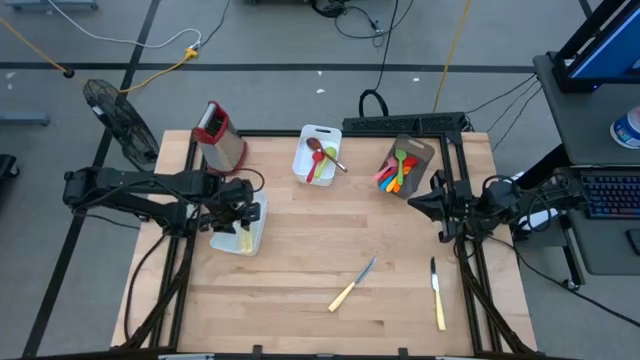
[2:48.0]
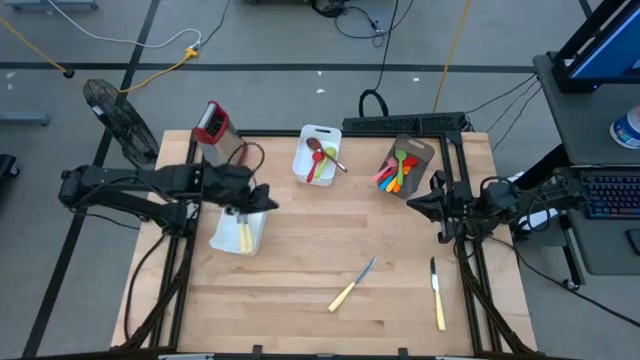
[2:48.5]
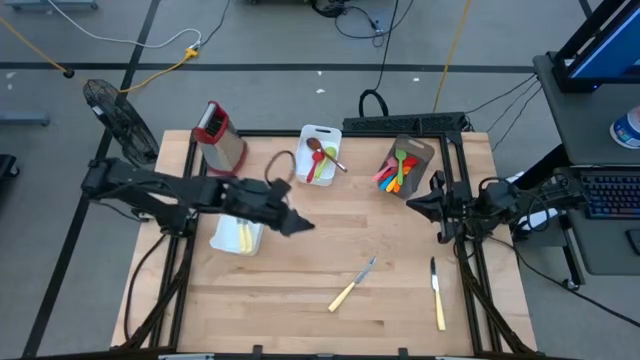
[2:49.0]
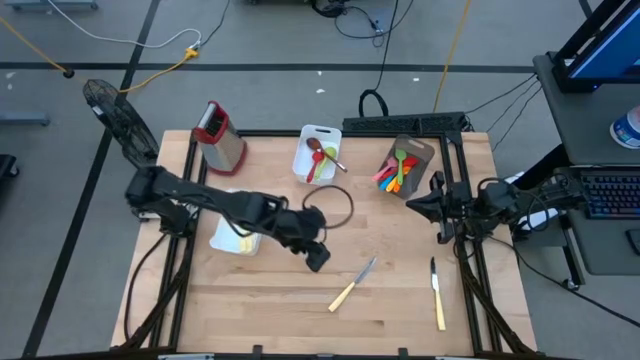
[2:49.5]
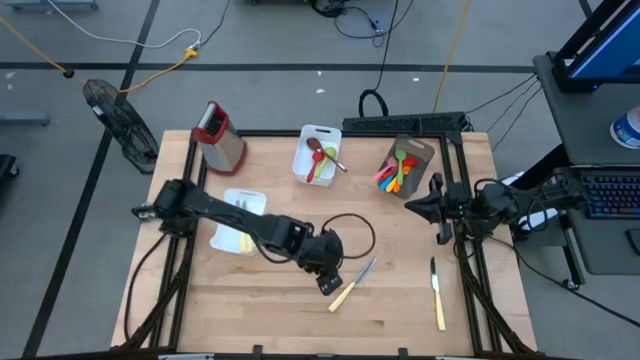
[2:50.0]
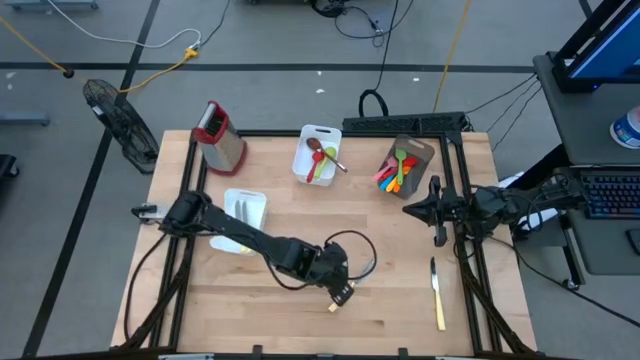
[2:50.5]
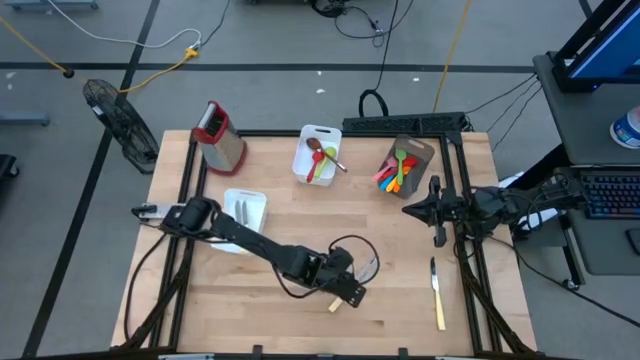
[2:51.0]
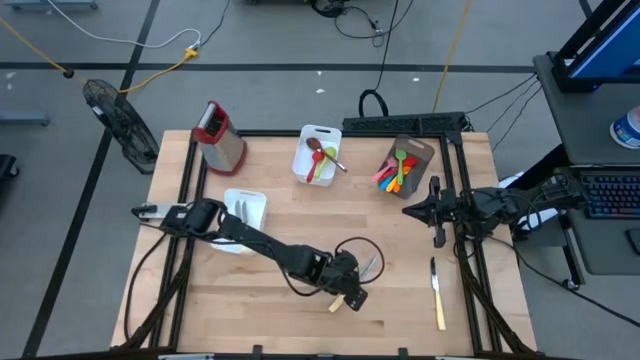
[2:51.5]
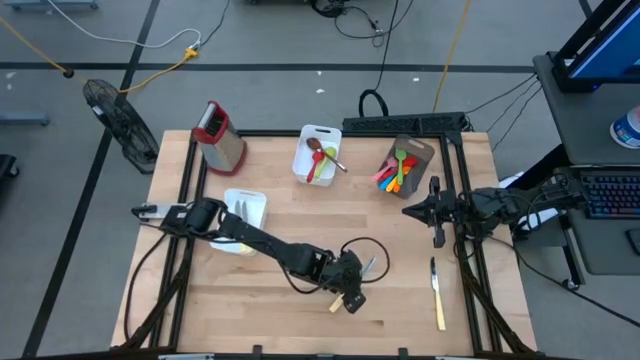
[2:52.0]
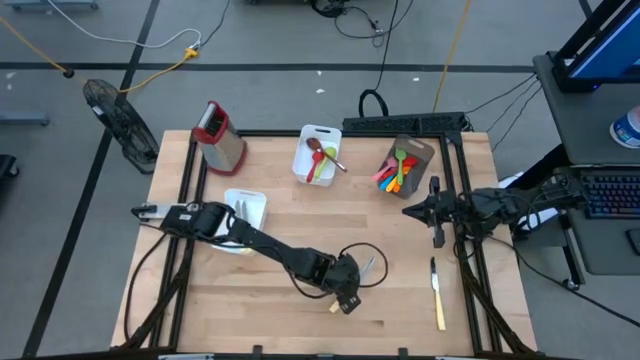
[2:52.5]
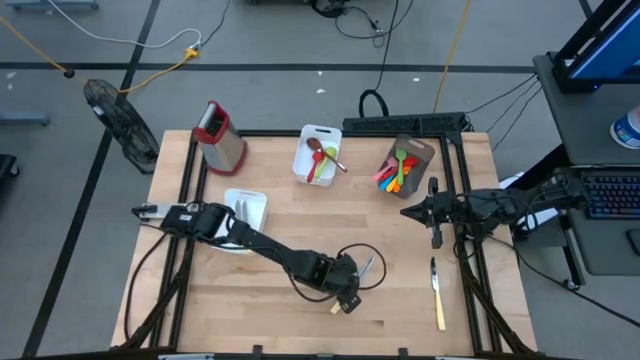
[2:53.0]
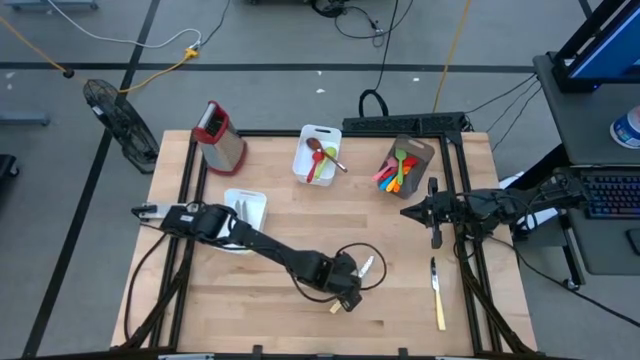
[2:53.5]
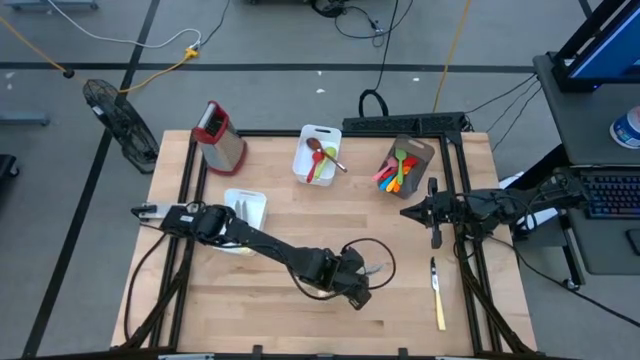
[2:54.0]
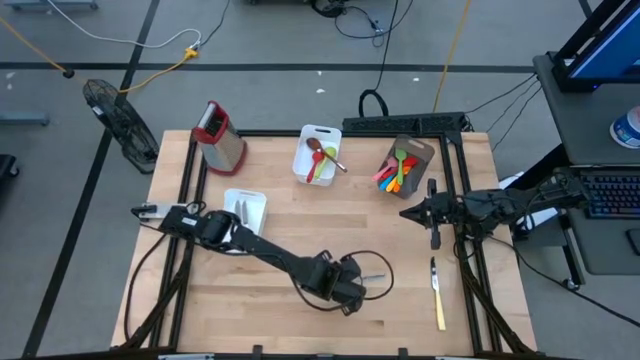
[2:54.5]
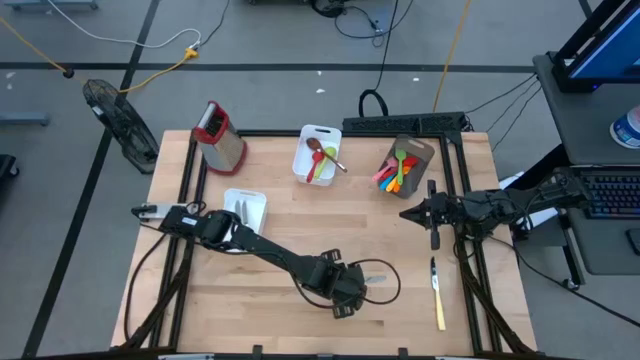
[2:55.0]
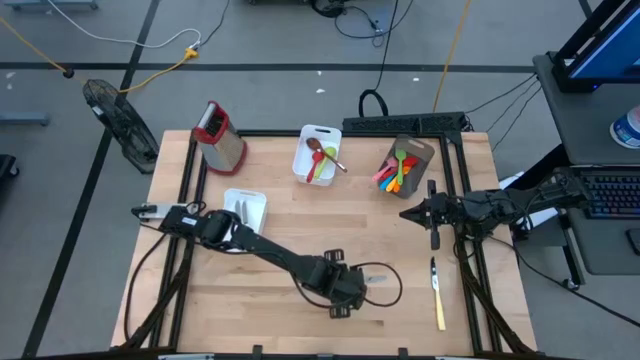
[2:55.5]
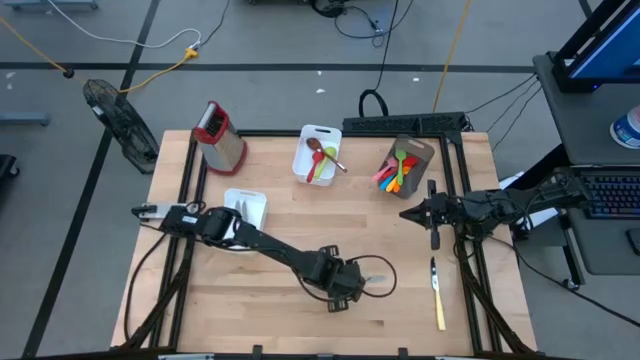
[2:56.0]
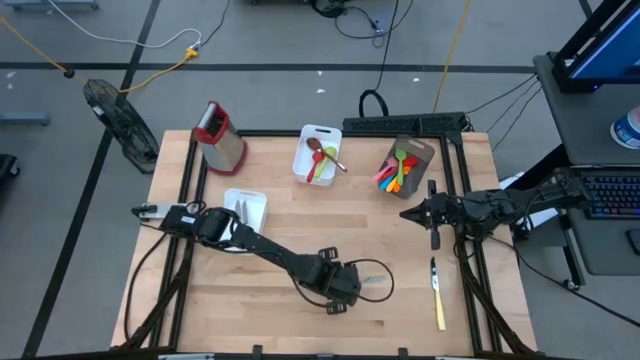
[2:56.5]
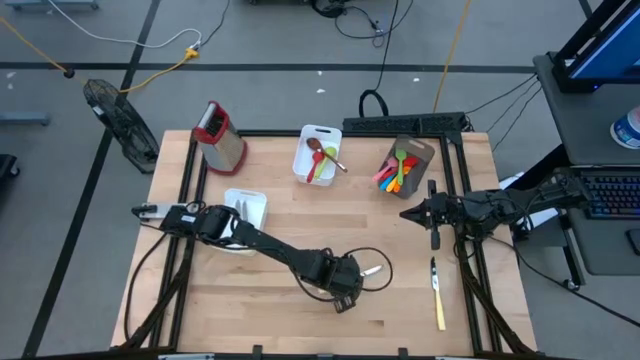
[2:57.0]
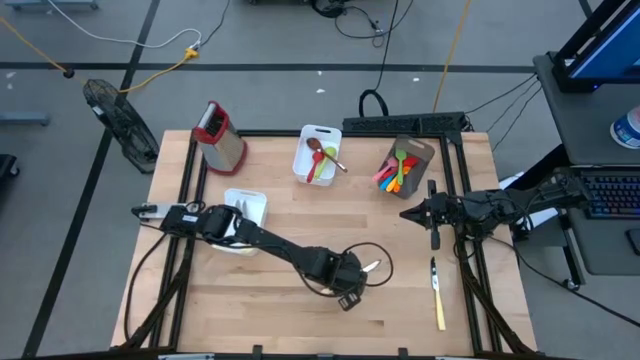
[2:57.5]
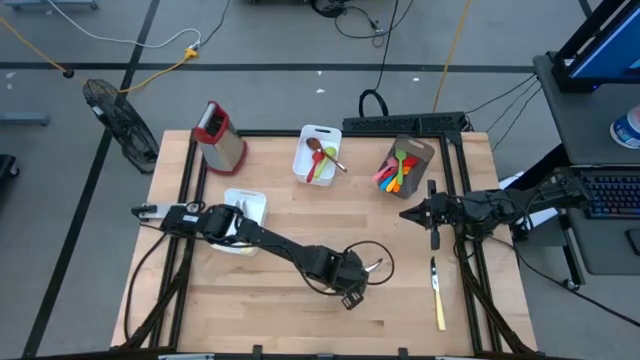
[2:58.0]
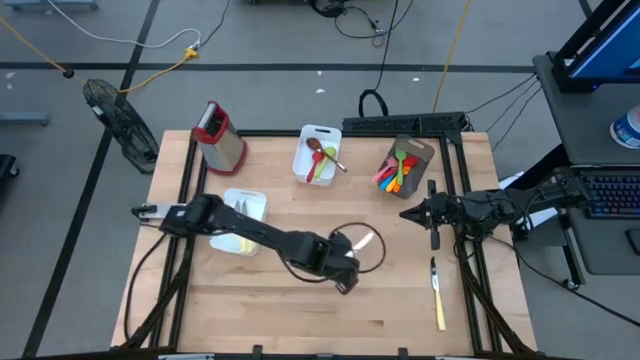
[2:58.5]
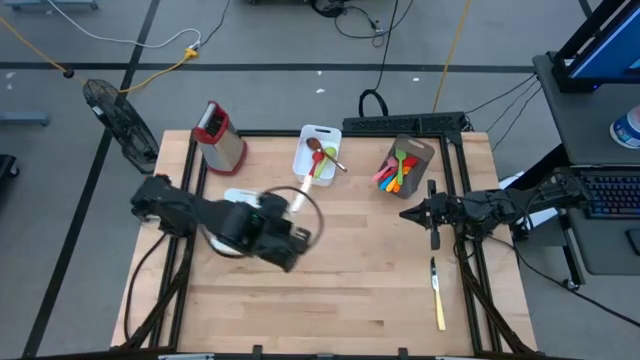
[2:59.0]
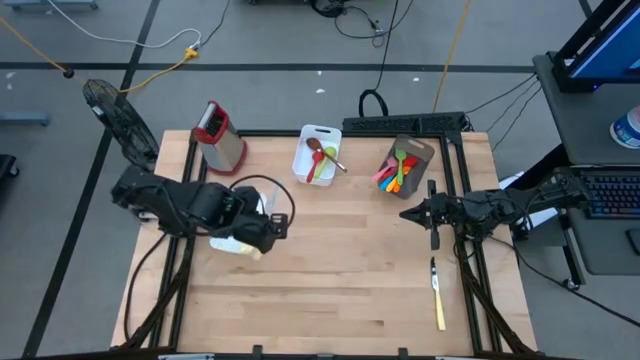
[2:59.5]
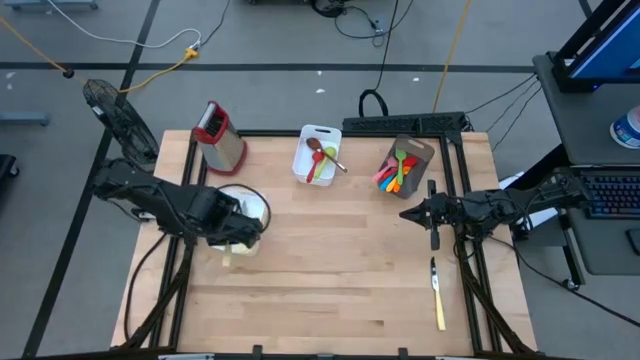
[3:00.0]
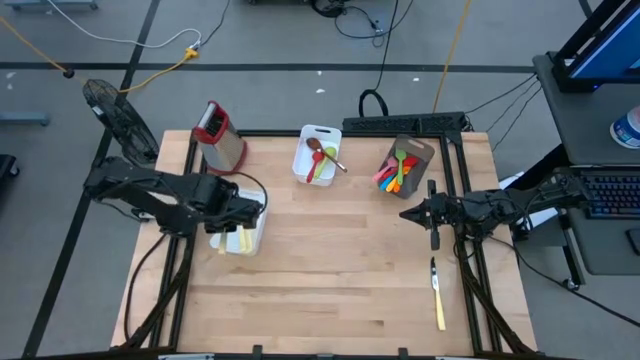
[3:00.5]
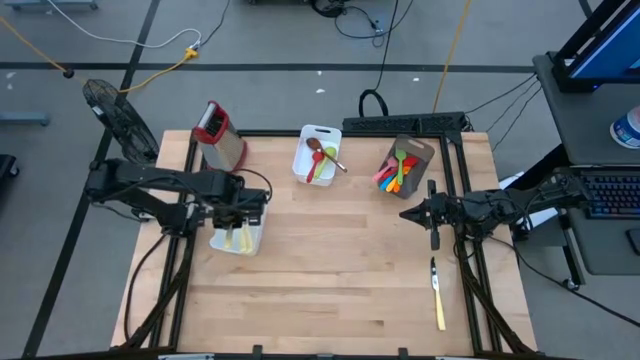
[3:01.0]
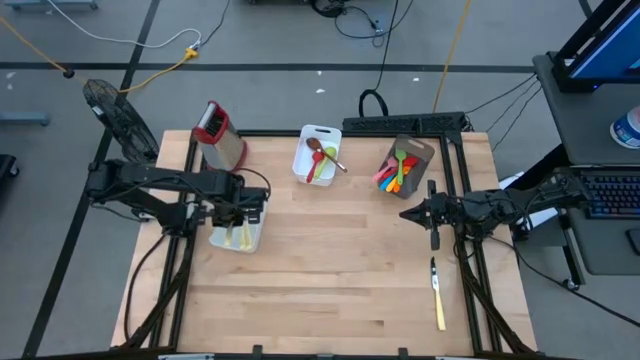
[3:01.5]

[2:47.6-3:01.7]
Task: Pick & Place Kitchen Items
Put the yellow knife into the bottom white bin

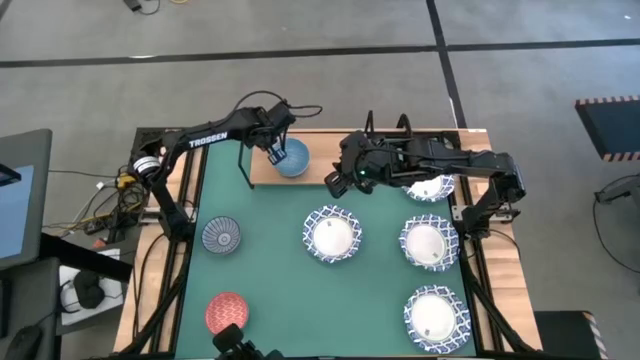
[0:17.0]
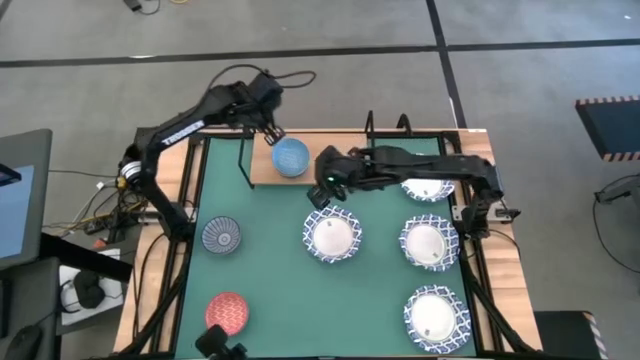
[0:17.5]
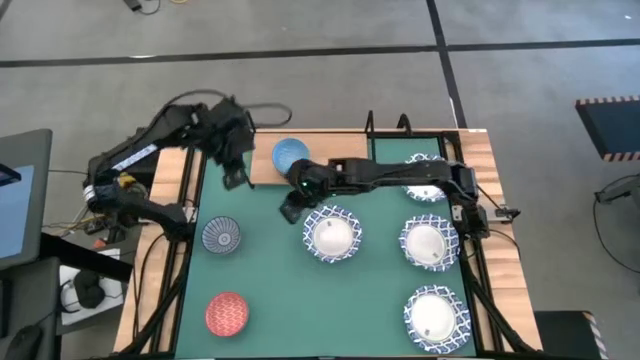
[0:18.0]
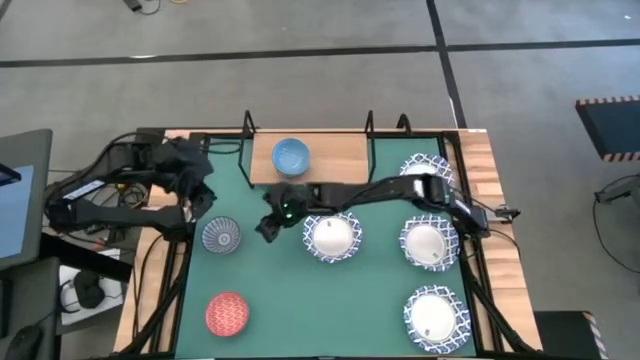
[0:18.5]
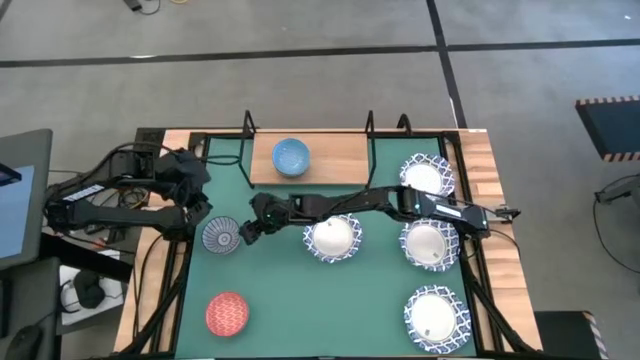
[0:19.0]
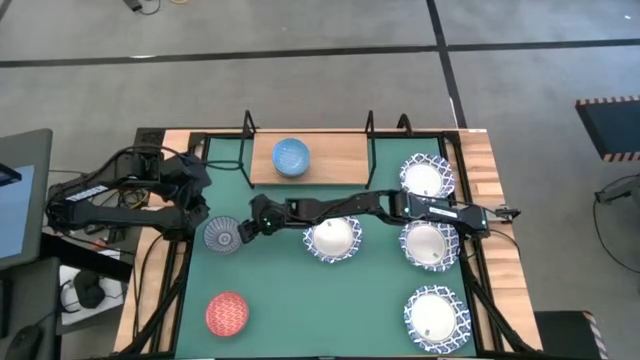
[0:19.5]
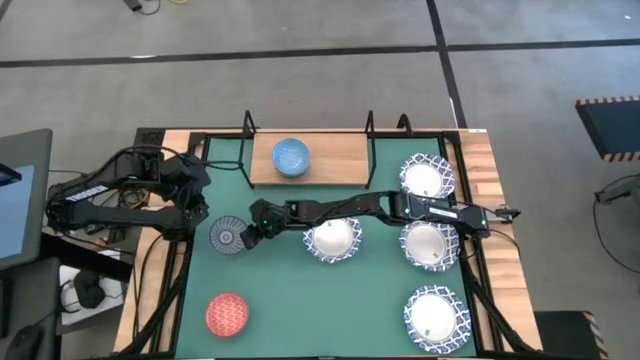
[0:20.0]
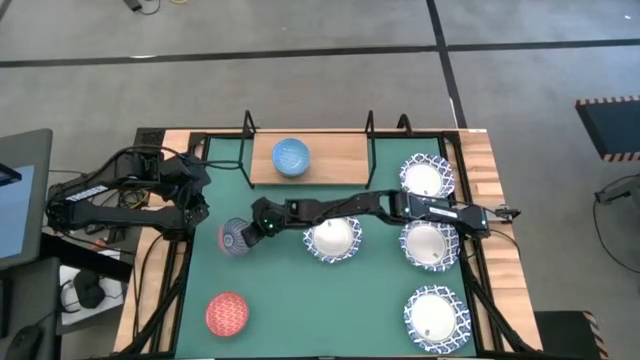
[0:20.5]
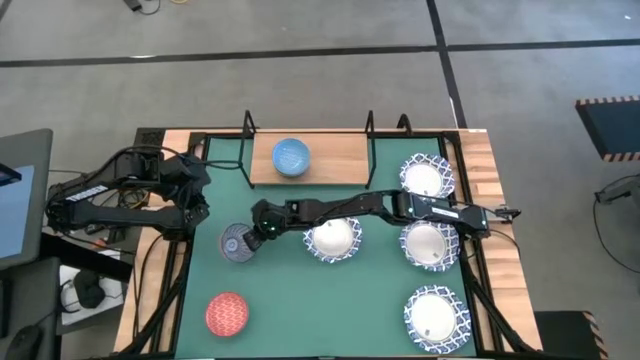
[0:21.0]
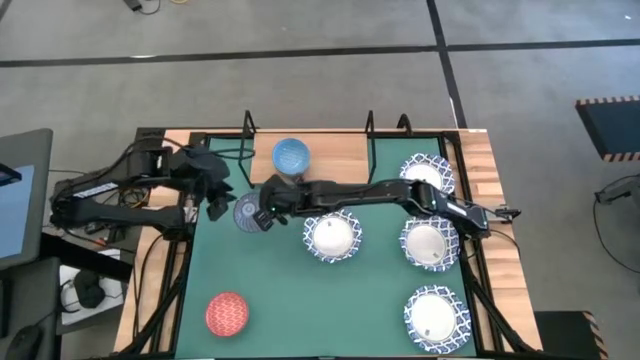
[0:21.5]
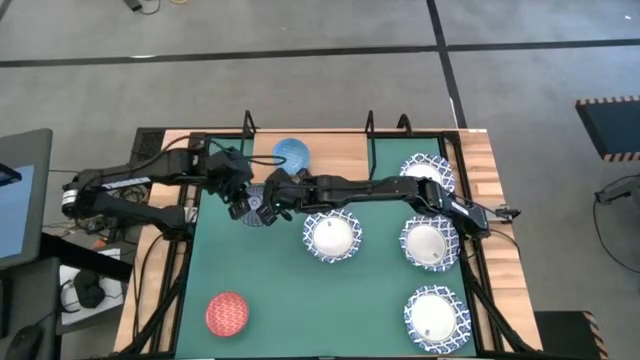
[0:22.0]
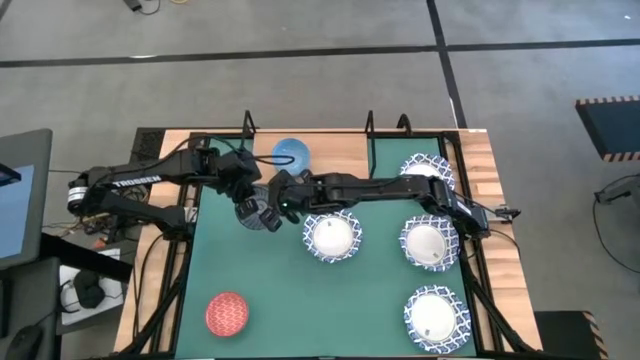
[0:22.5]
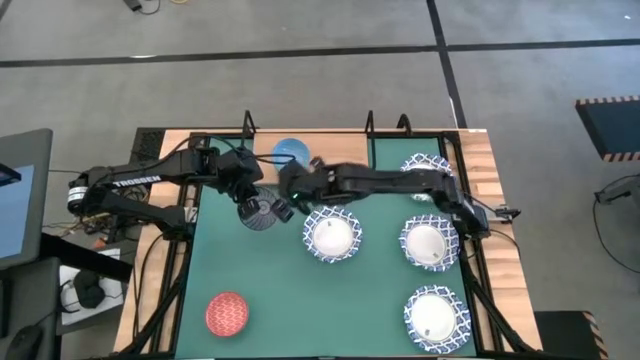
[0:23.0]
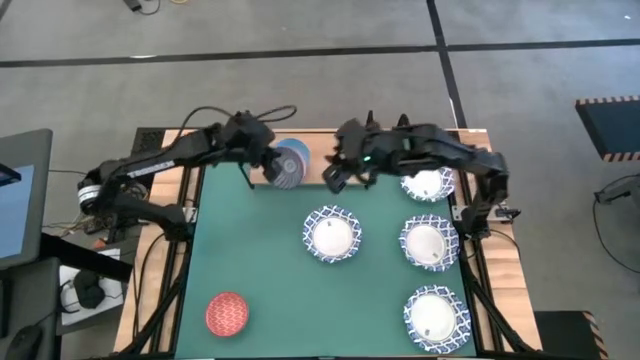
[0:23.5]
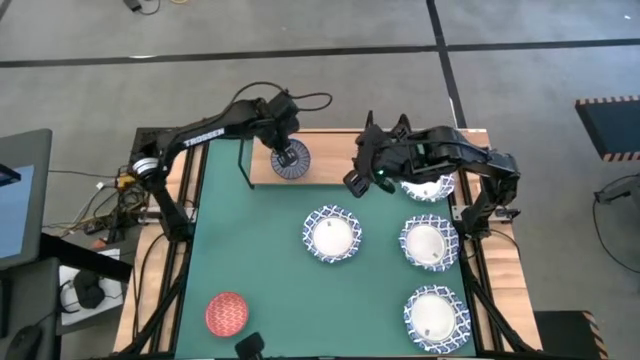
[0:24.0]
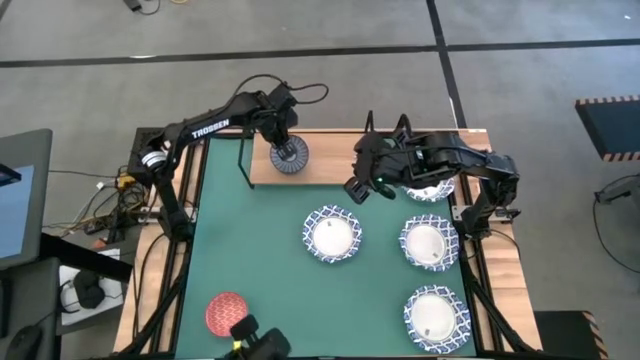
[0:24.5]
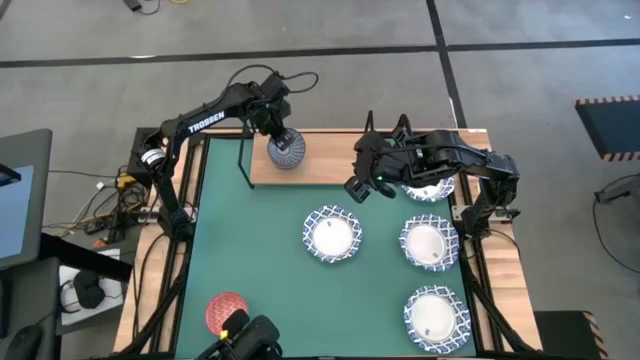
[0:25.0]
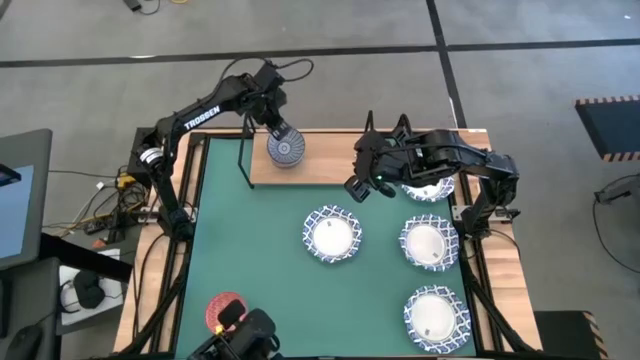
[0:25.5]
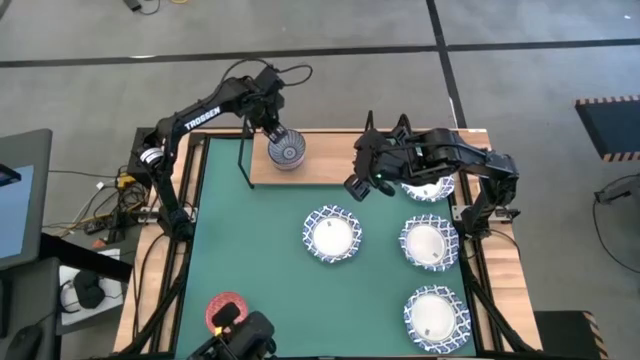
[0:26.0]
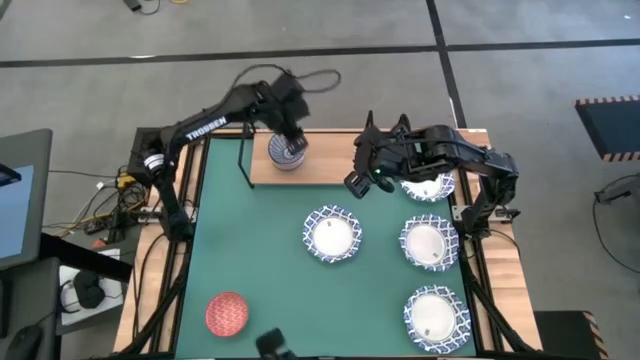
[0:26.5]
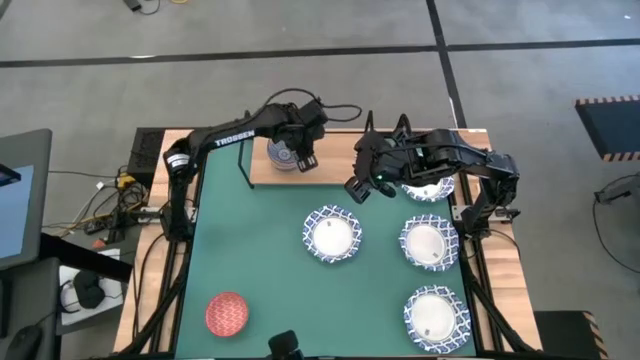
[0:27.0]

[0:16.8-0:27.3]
Task: Place and stack bowls onto a shelf
Stack the small dark blue bowl on top of the small light blue bowl on the shelf
